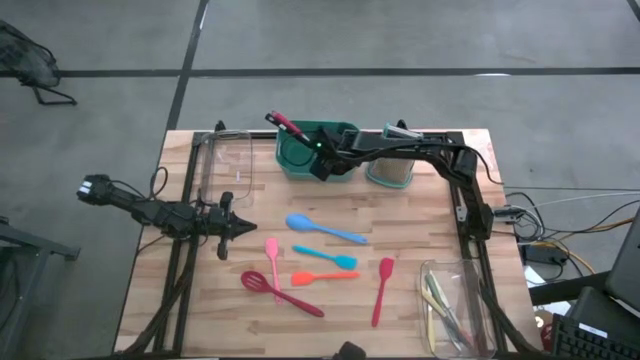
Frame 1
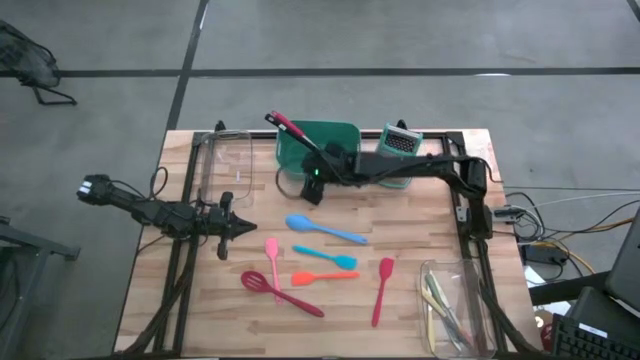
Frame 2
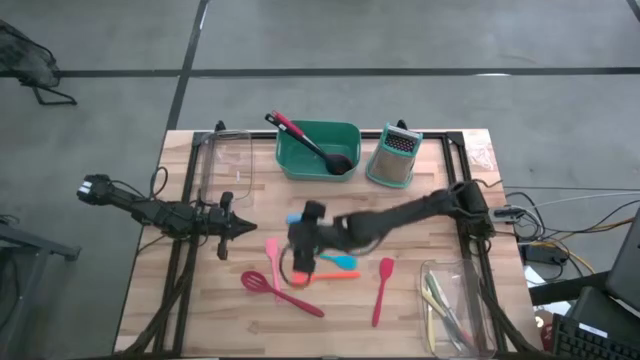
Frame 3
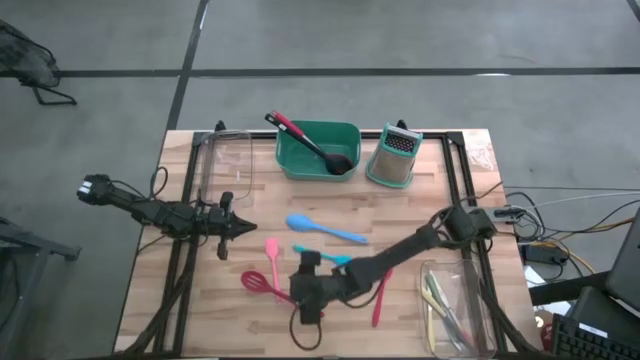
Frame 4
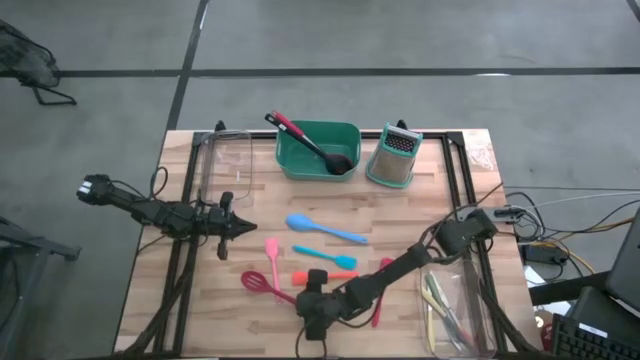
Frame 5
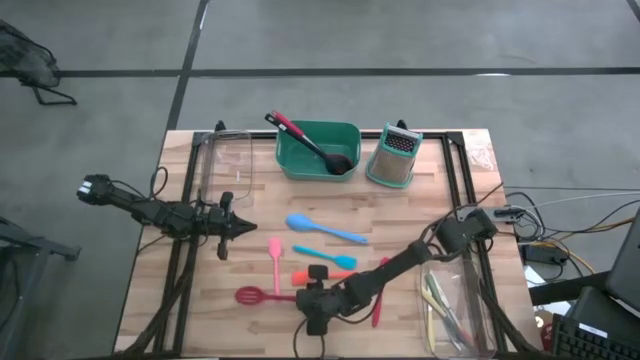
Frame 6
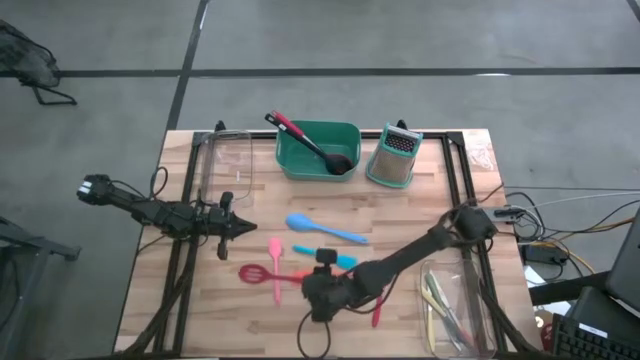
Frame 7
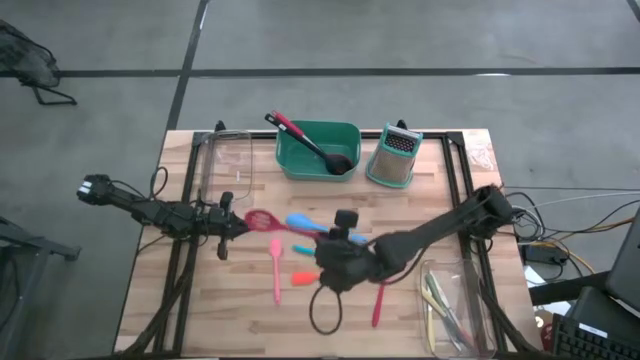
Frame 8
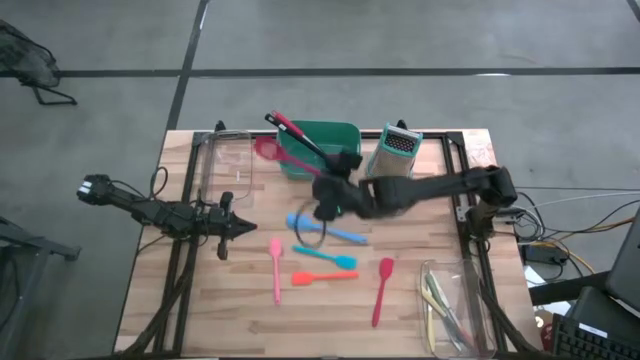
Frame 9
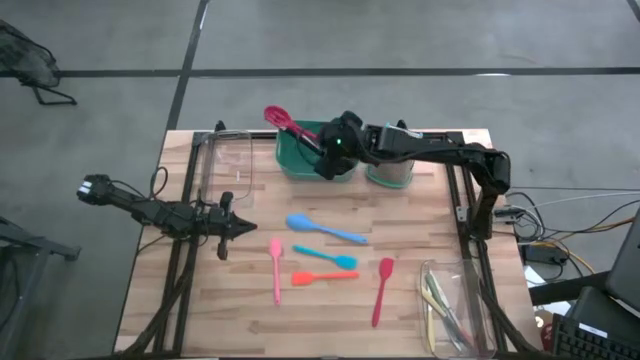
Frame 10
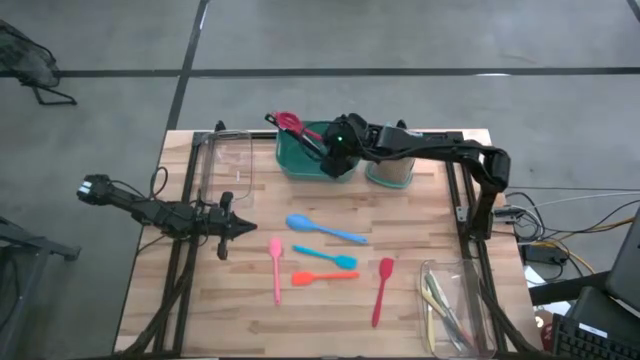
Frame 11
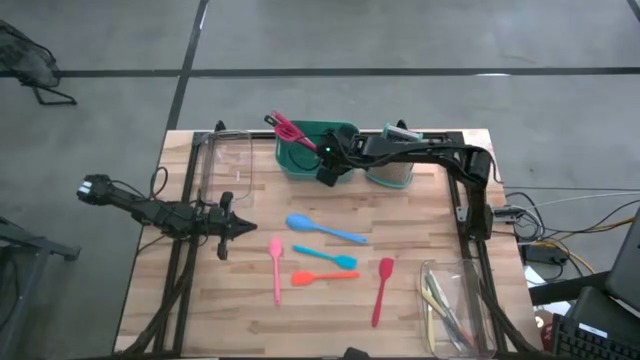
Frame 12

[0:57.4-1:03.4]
Task: Pick & Place Kitchen Items
Put the red serving spoon into the green bin

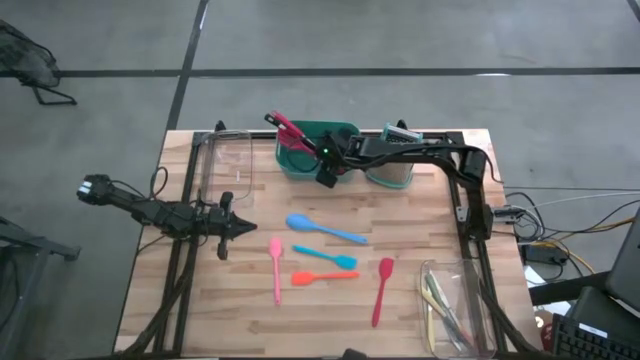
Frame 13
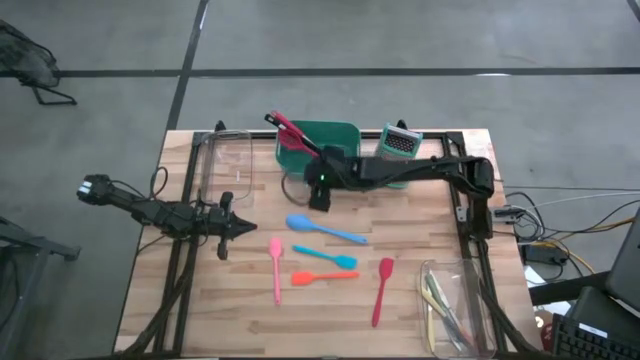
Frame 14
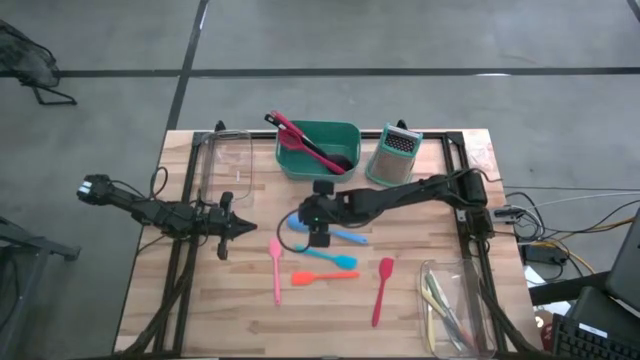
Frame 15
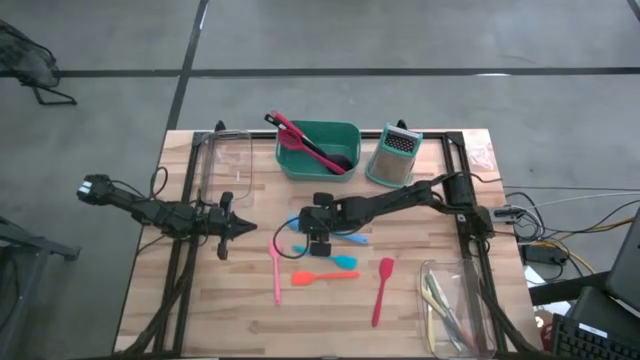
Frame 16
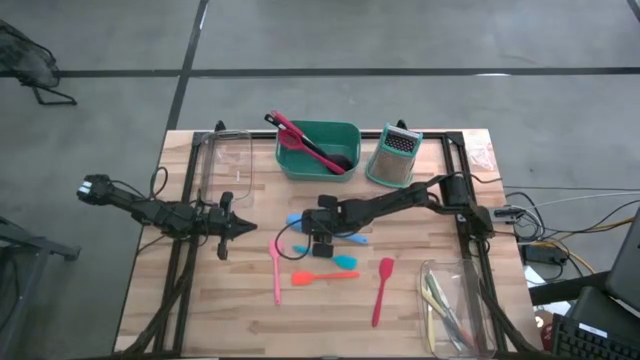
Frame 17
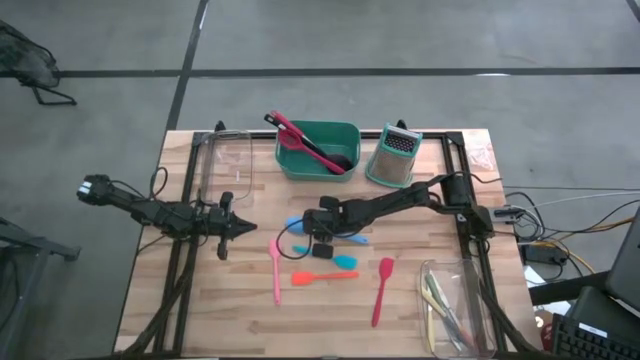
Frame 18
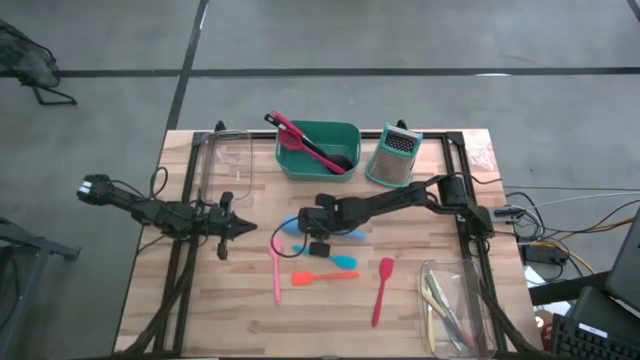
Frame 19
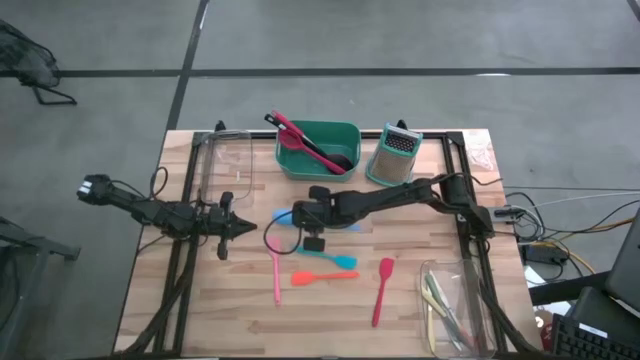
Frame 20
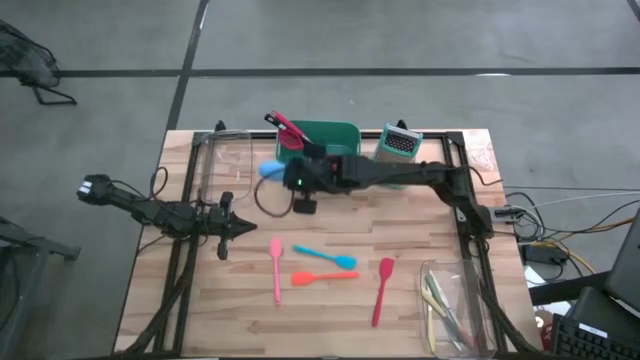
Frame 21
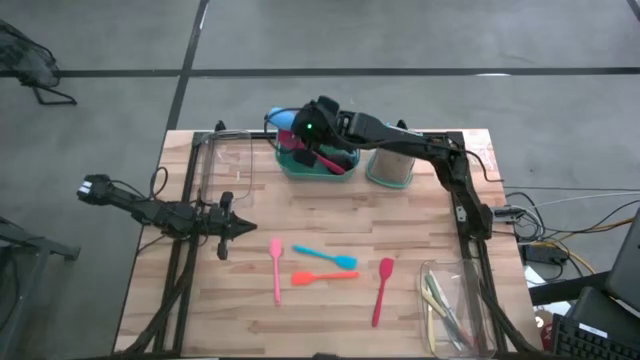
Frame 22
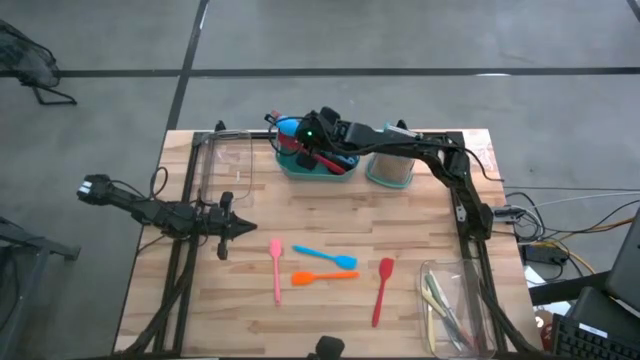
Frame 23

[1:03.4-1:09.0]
Put the light blue spatula into the green bin

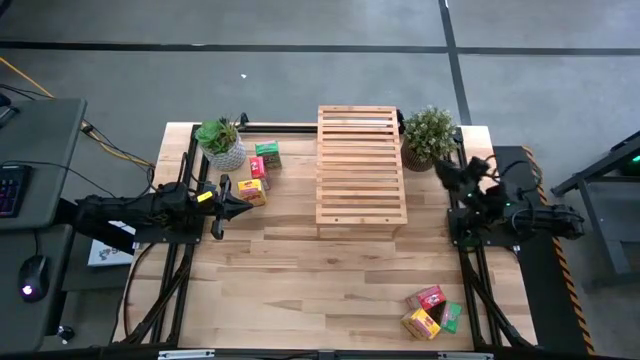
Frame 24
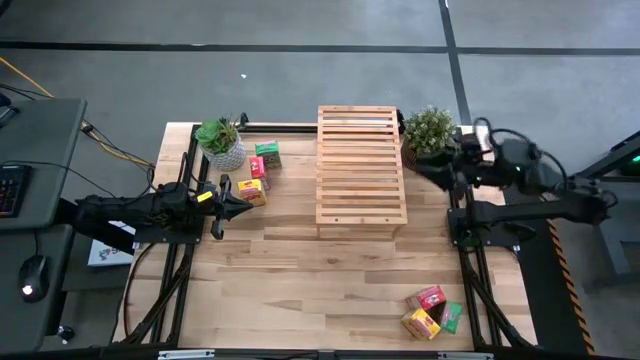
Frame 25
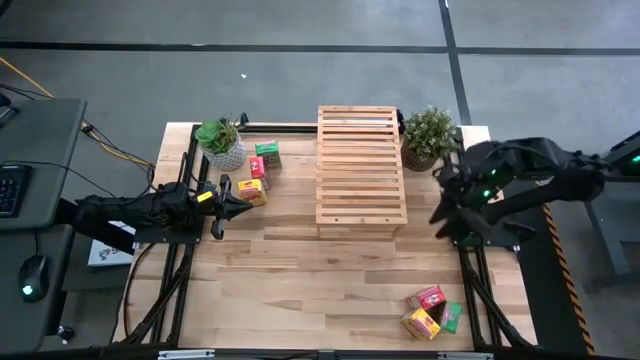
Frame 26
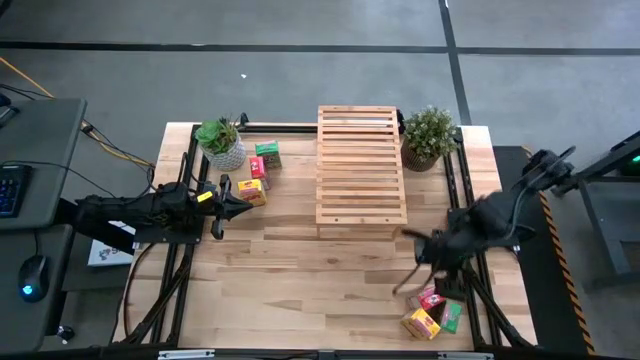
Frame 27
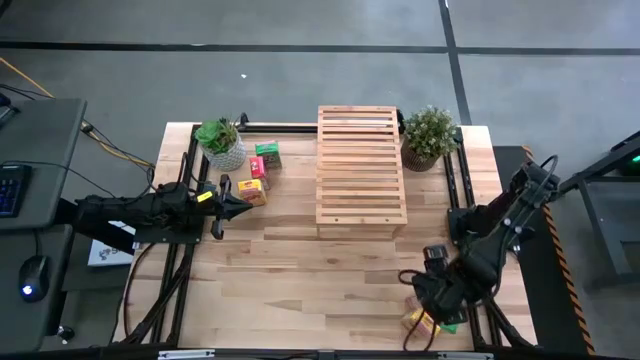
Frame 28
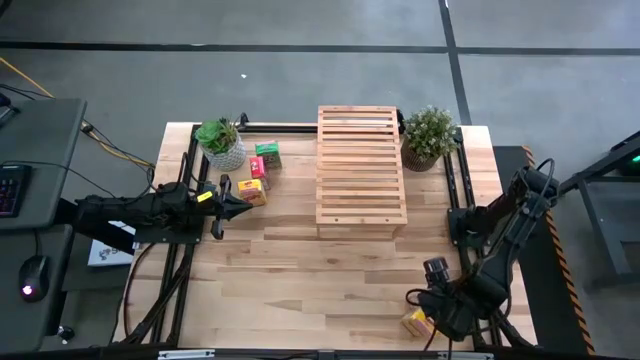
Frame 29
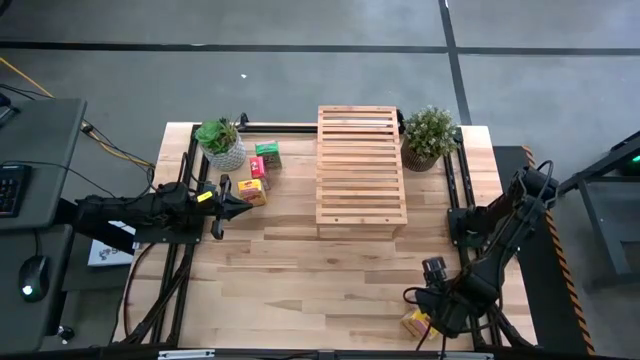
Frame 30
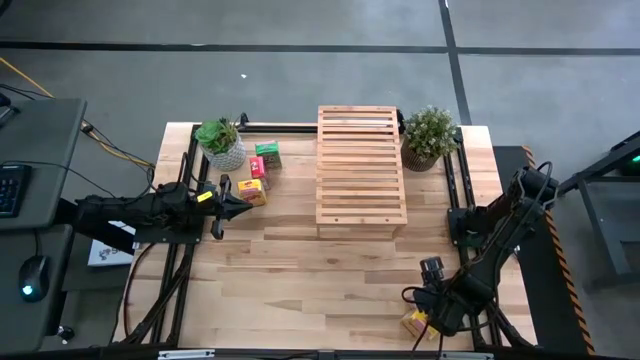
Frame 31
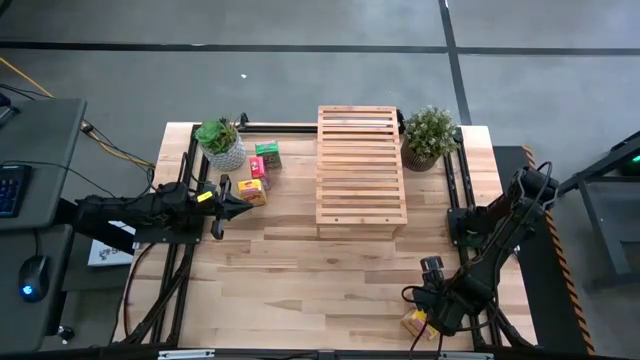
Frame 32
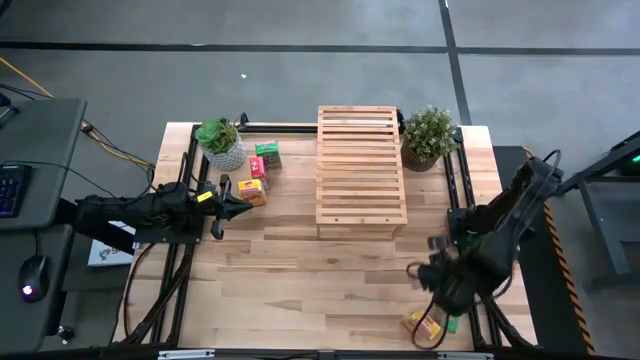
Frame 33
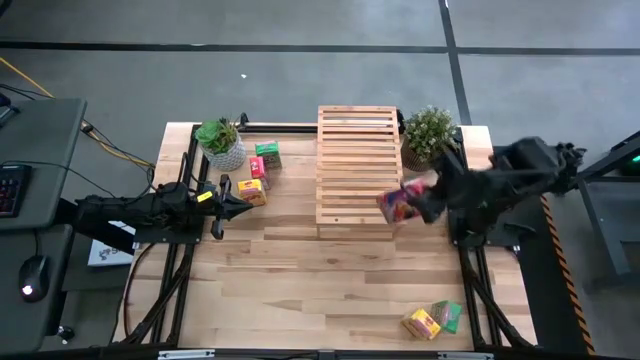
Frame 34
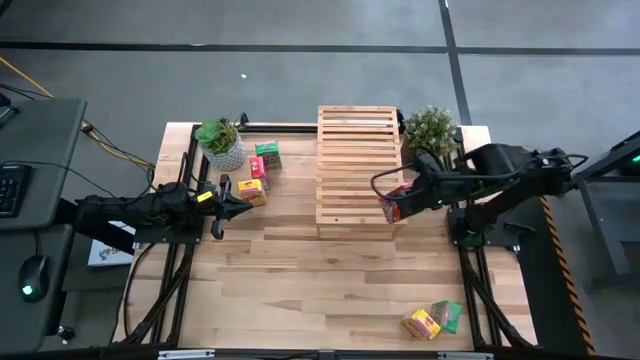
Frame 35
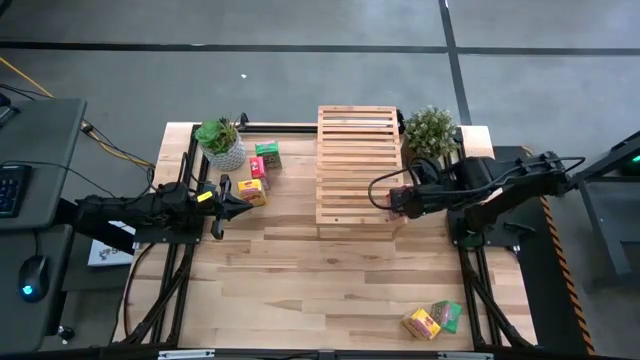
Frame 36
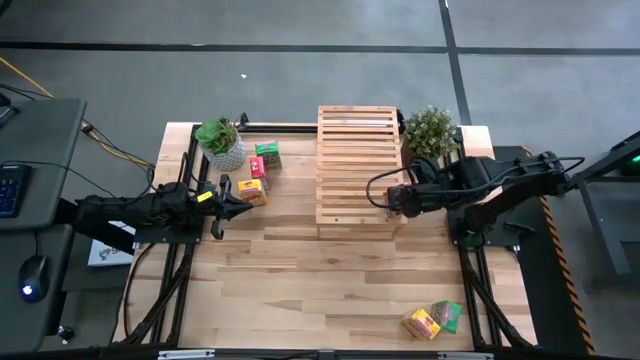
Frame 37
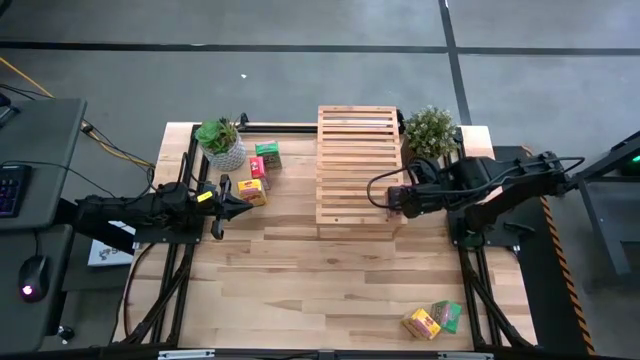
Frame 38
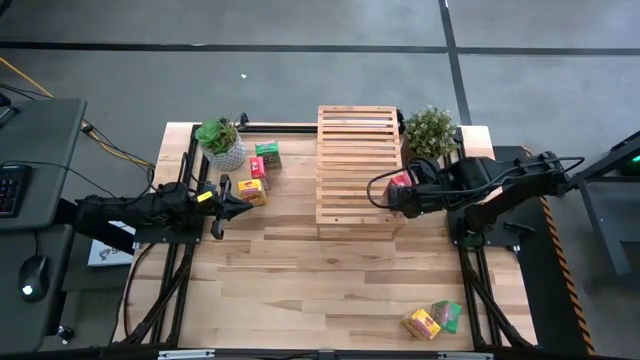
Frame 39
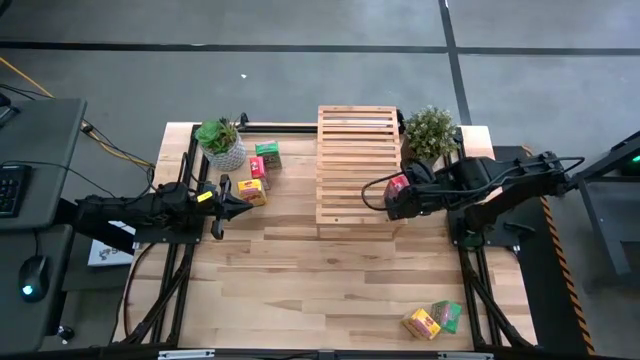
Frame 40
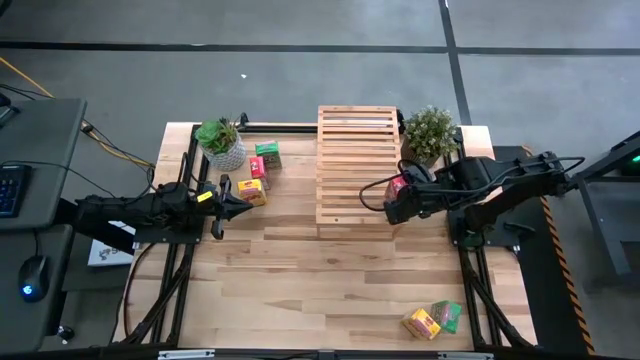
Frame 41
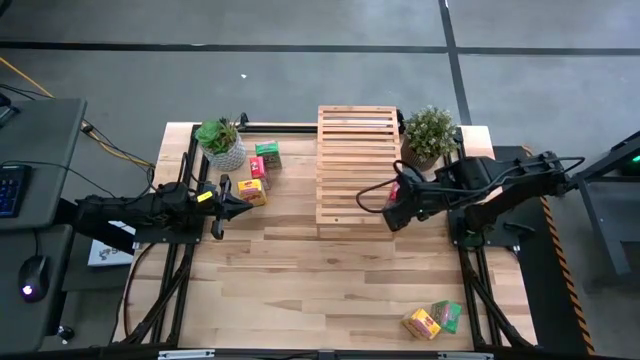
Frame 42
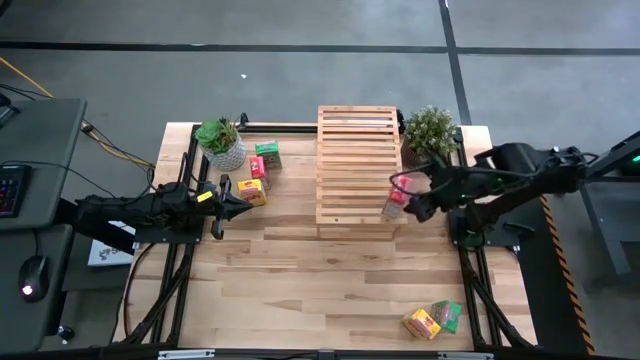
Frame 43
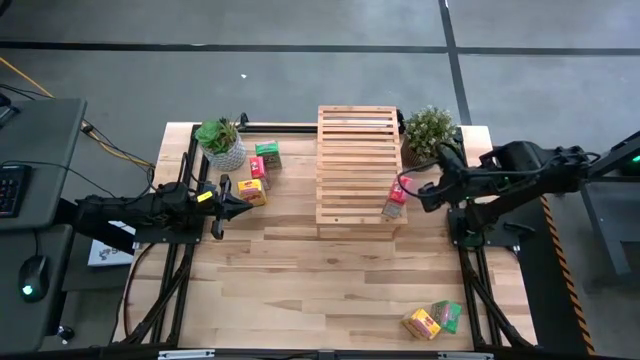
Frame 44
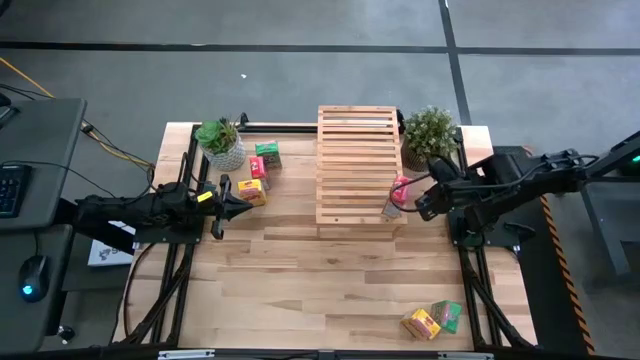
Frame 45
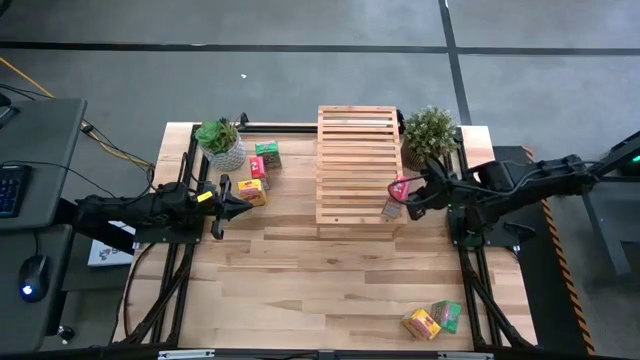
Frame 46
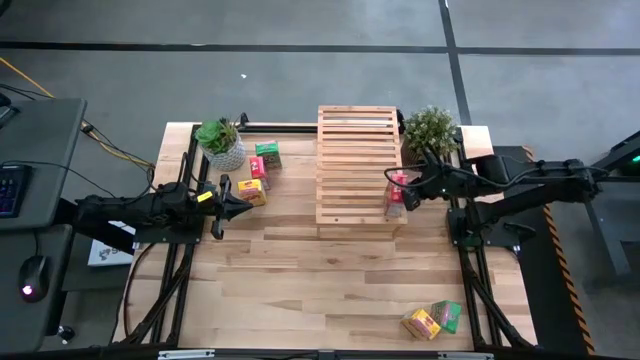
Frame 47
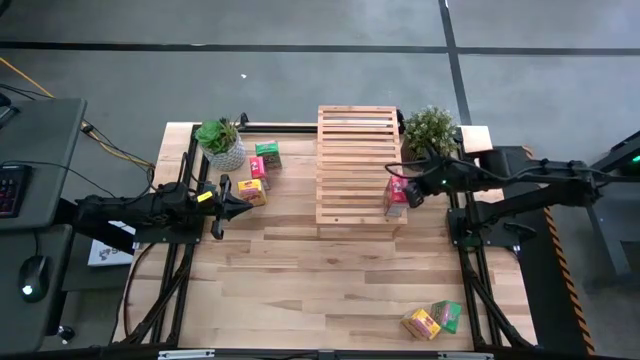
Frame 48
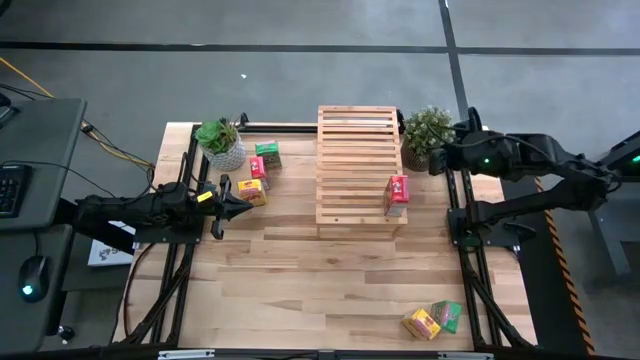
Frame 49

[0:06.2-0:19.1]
Task: Stack cereal on shelf
Put the bottom red cereal box on the shelf
